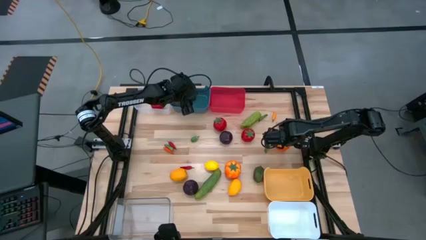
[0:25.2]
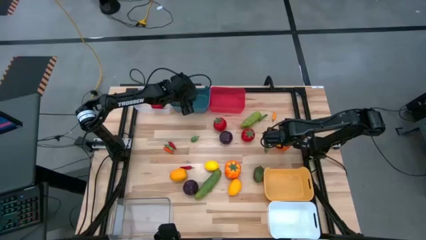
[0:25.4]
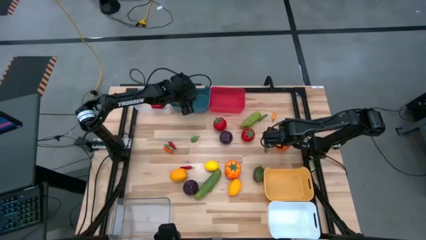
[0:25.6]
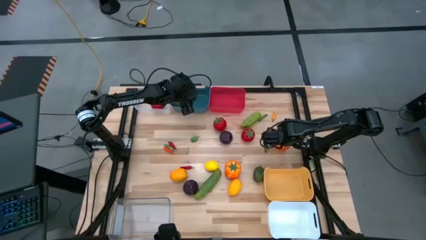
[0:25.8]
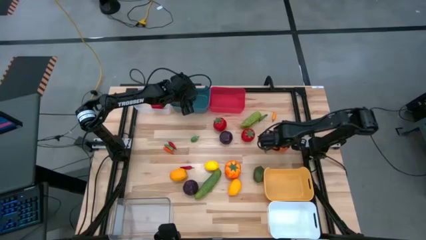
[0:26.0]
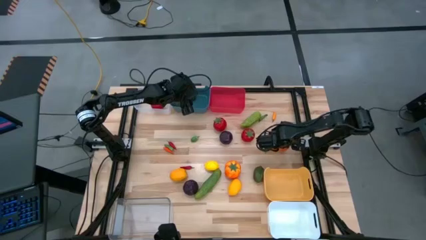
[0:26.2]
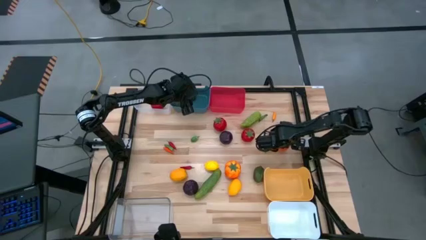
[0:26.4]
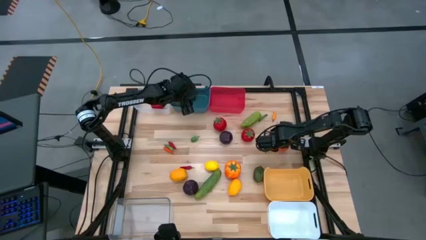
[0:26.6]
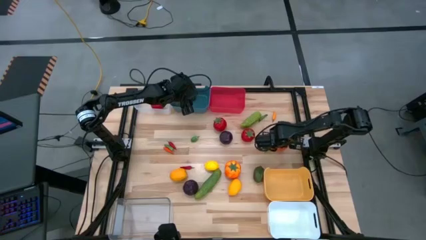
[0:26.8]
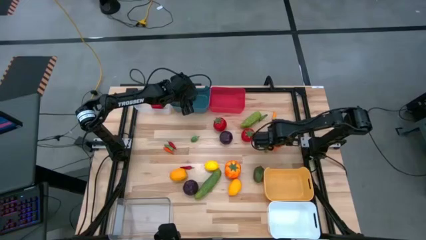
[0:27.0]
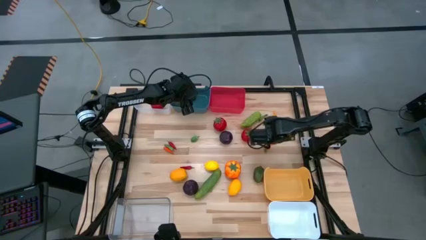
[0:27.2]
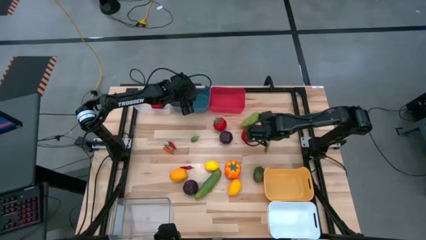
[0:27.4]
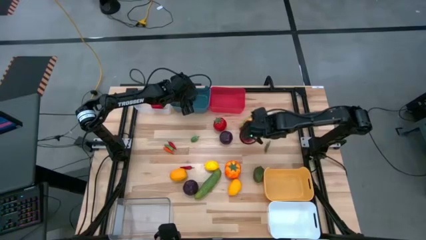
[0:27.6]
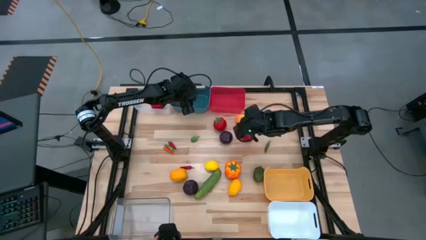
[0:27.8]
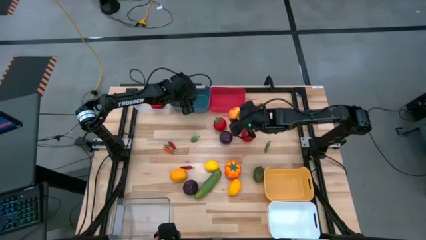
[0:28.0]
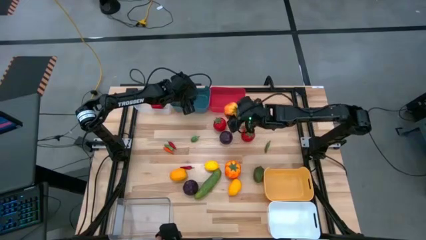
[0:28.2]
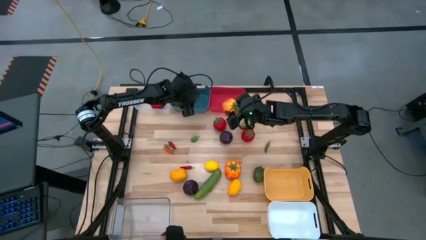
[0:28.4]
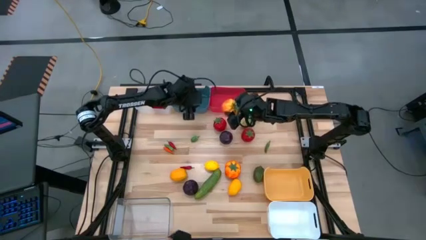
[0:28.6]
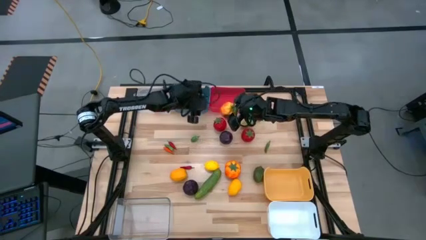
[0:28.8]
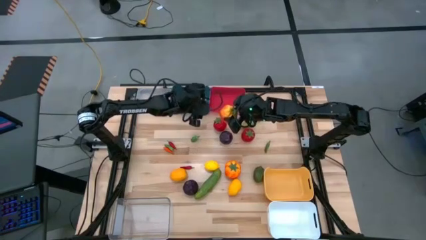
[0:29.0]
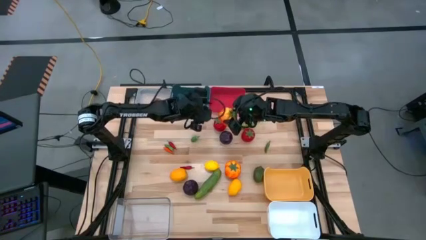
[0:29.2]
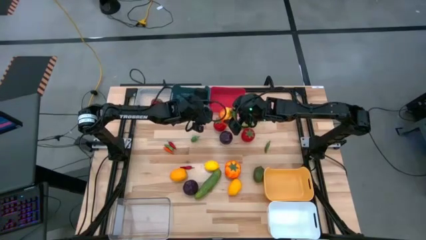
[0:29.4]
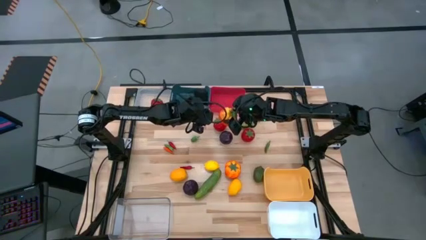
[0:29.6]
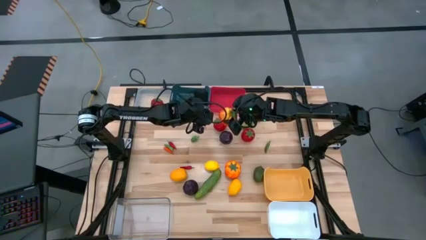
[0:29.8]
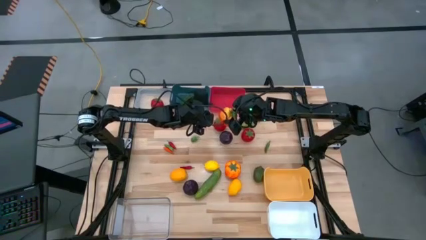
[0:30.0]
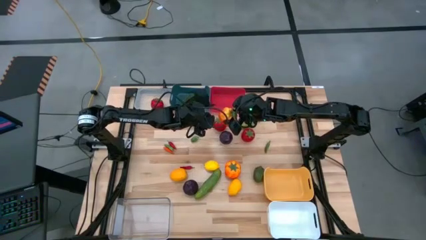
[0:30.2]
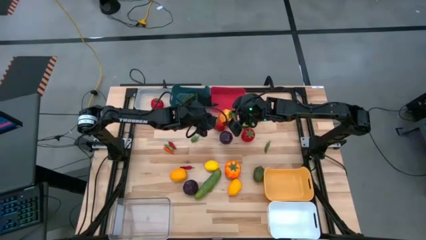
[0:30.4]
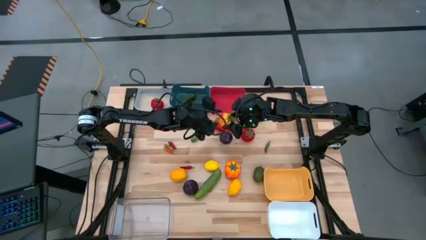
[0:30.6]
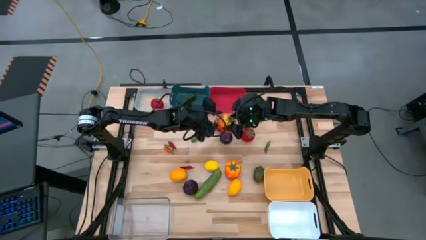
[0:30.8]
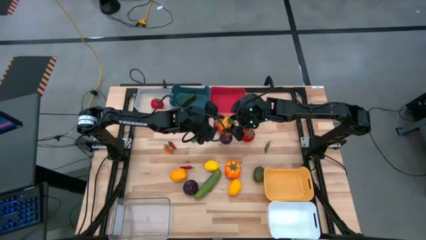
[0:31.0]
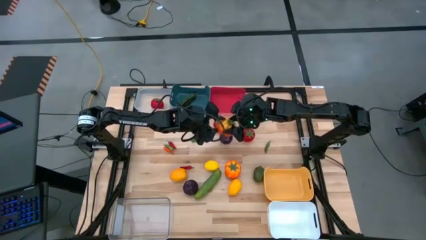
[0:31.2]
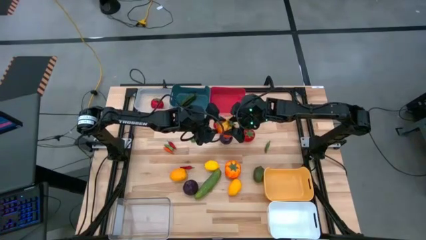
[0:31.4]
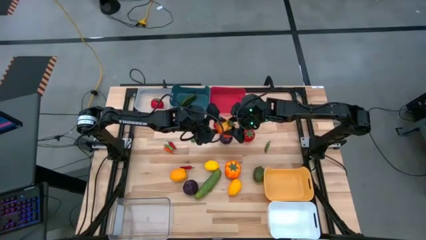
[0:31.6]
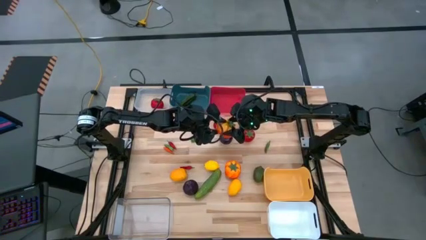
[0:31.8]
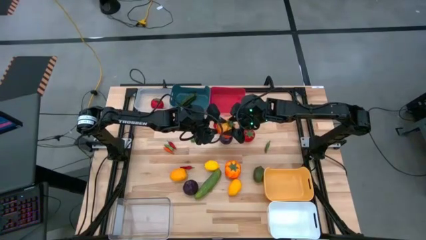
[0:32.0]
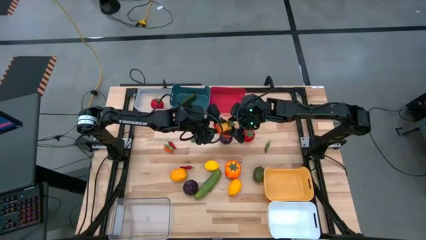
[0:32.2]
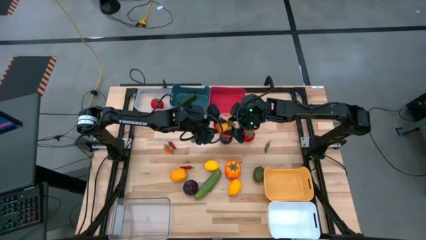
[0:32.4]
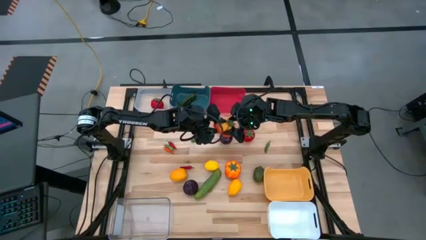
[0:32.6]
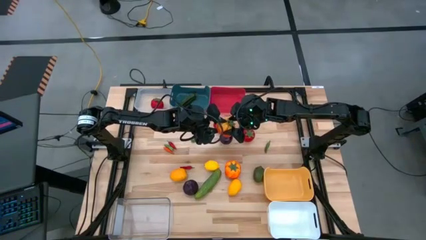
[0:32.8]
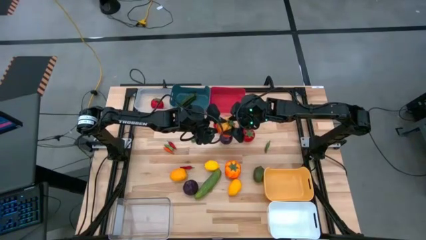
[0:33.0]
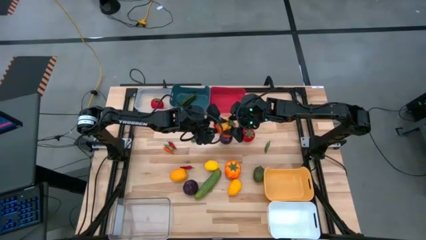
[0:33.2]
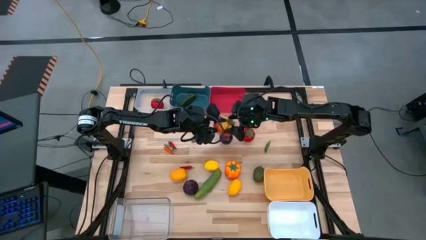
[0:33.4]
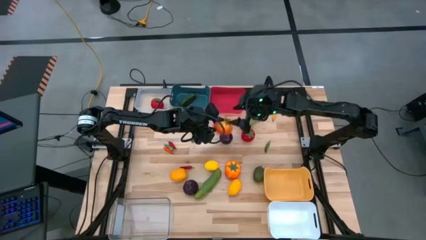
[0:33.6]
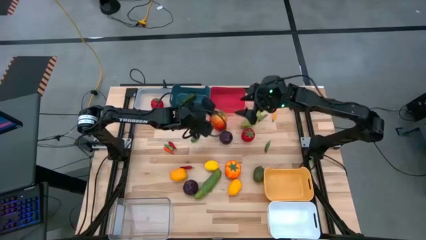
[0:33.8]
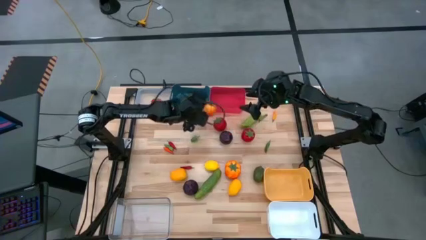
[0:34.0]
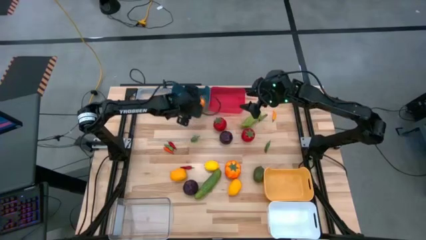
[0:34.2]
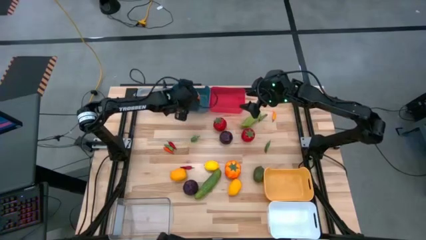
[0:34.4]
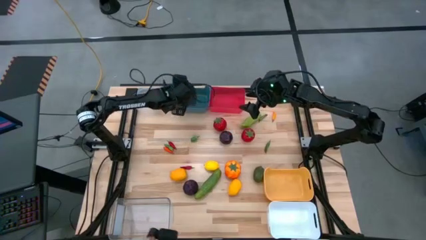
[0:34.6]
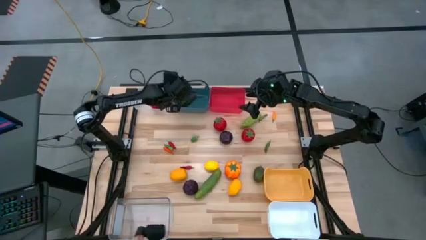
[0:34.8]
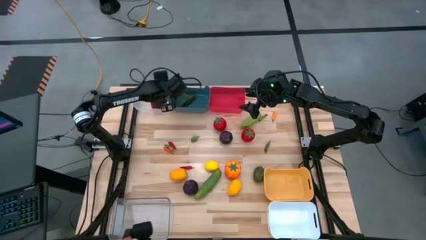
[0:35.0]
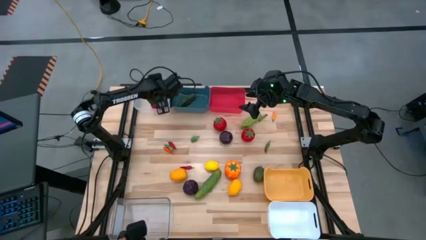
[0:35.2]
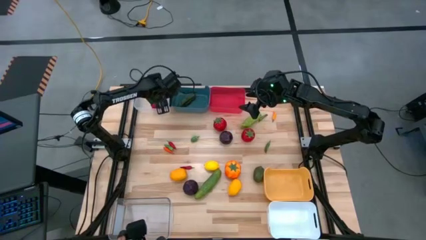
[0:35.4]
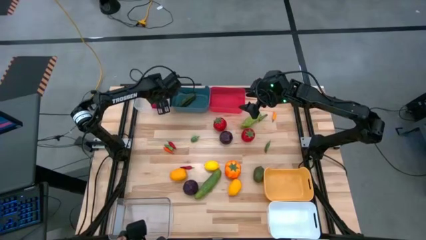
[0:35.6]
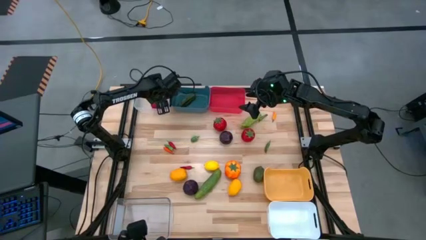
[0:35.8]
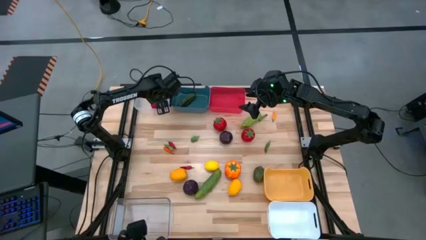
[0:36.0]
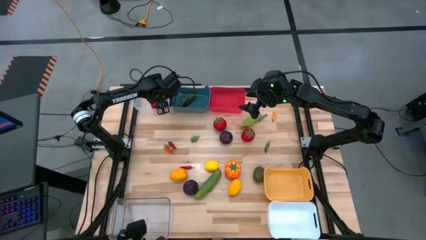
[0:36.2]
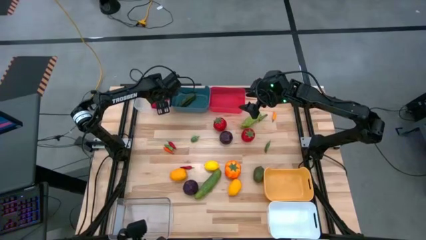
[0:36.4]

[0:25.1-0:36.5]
Task: Sort produce into baskets
Put the orange tomato into the top transparent bin

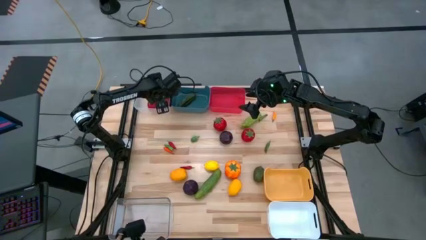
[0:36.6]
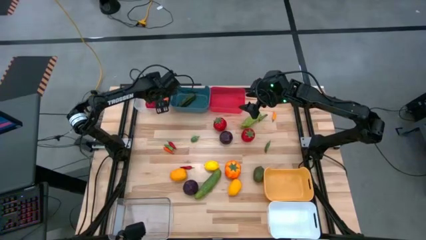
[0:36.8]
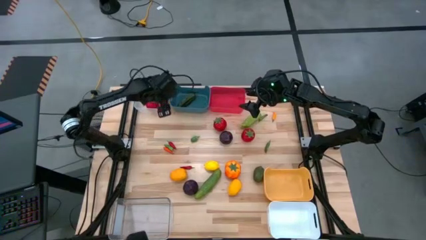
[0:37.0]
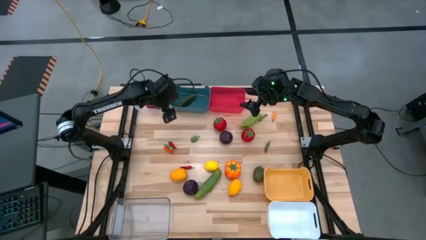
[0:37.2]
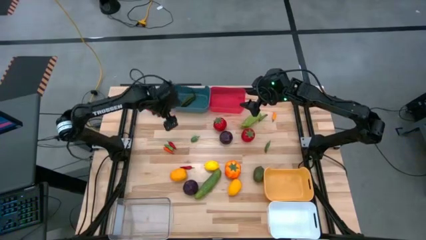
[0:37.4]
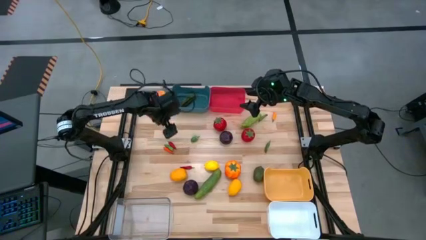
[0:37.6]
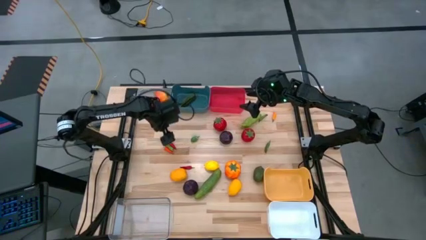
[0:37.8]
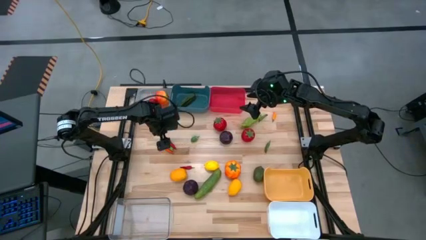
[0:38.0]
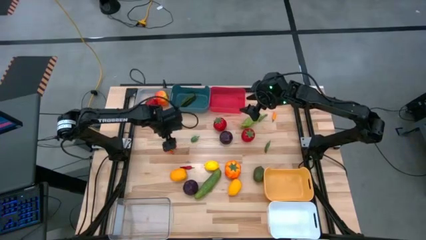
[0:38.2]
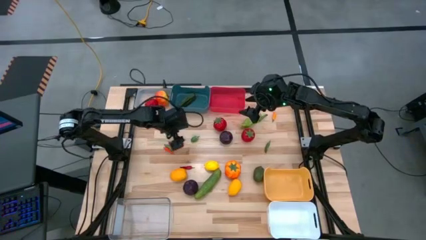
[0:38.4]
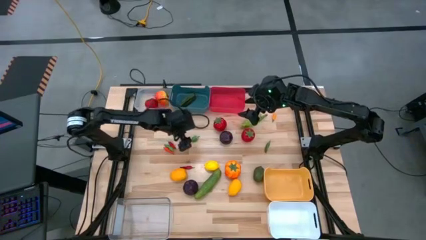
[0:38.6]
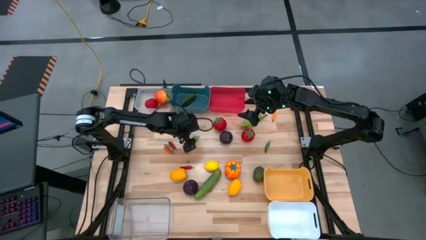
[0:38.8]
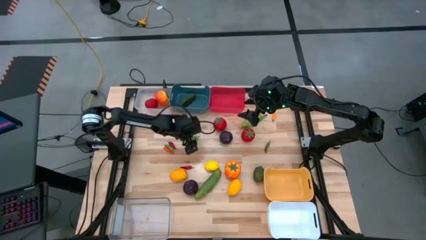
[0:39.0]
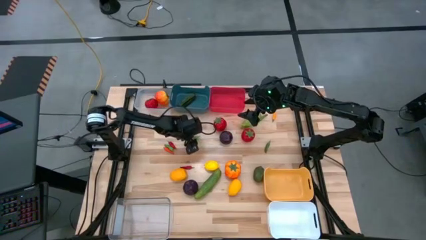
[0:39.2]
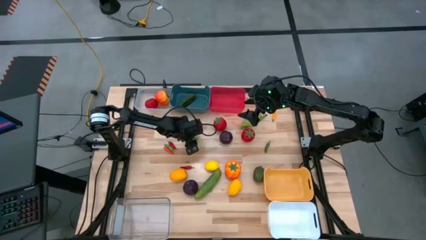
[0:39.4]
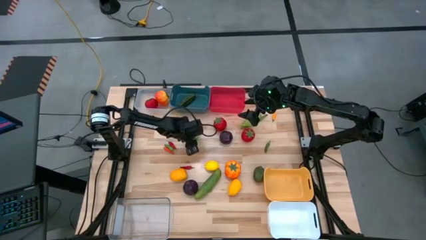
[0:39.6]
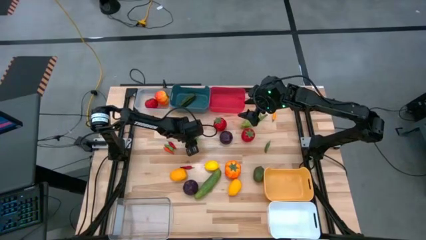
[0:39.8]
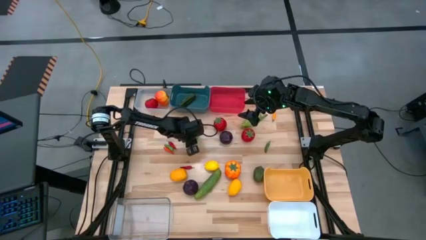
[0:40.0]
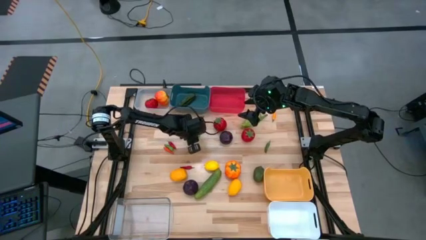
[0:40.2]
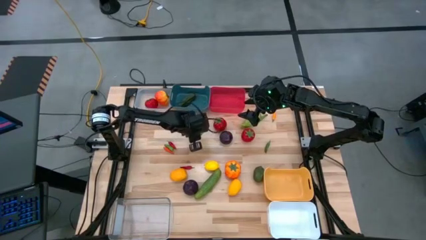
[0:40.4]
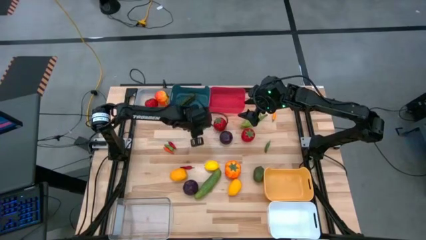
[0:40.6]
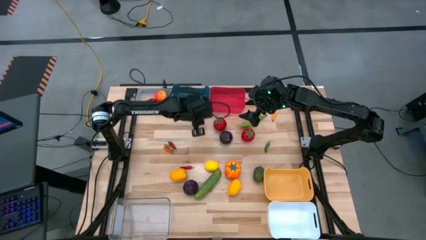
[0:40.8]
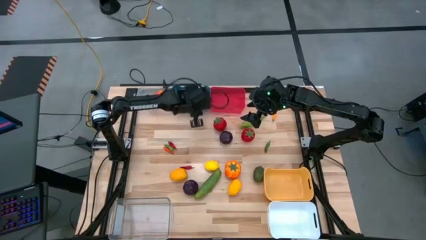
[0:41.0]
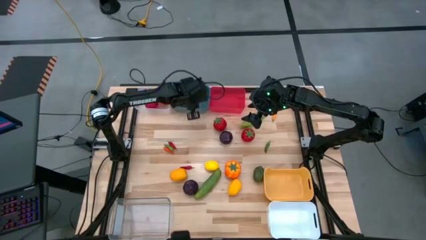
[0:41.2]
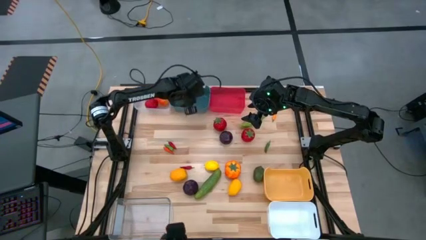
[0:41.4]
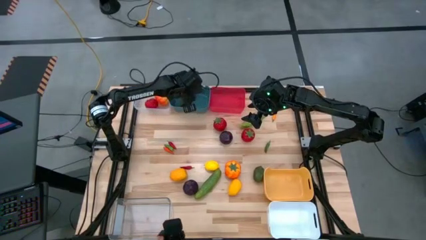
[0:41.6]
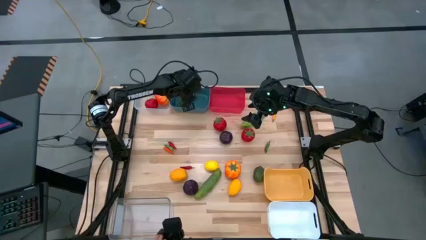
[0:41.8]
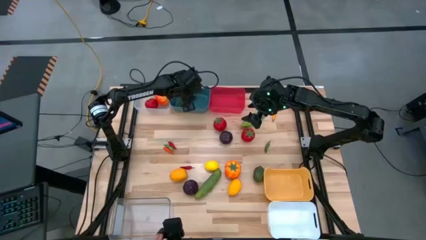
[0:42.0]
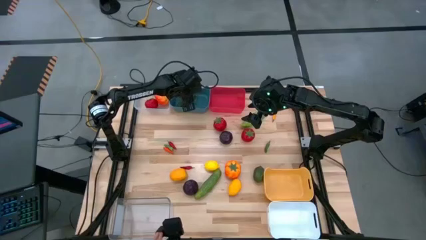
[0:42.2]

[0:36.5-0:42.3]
Put the green chili pepper into the blue bin
